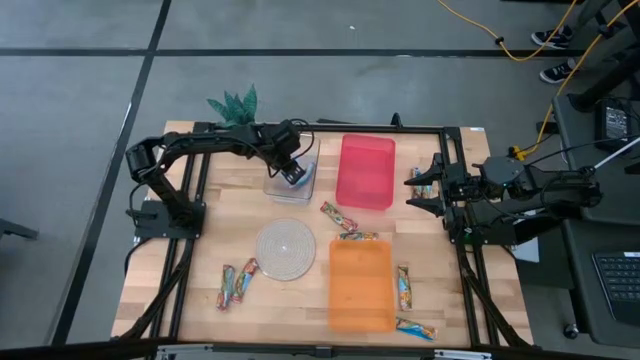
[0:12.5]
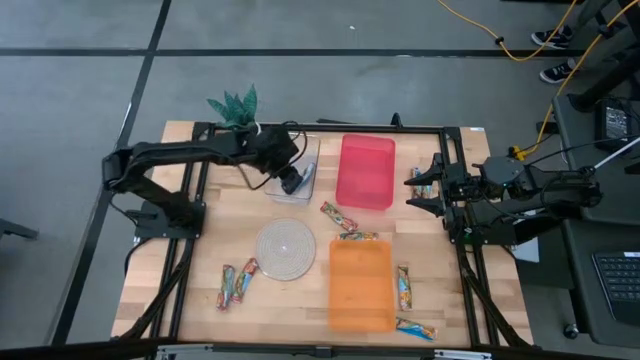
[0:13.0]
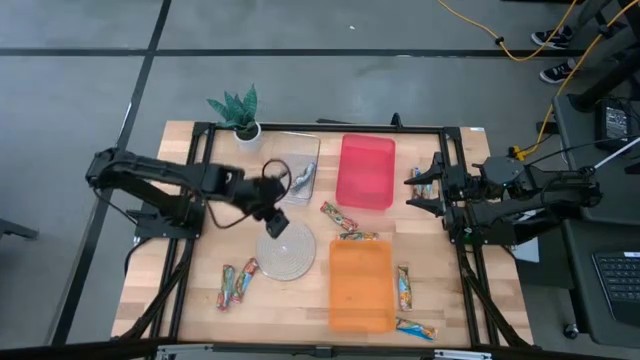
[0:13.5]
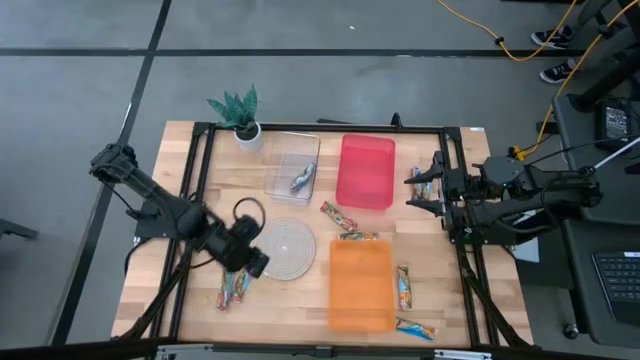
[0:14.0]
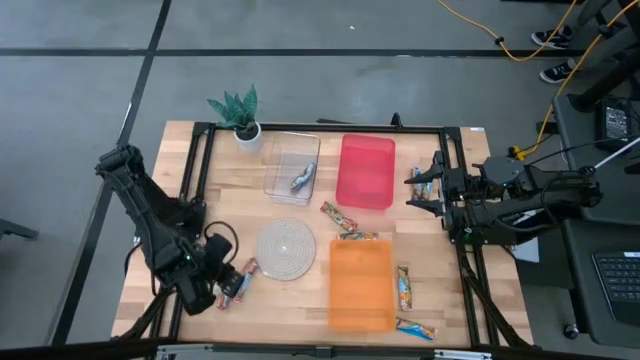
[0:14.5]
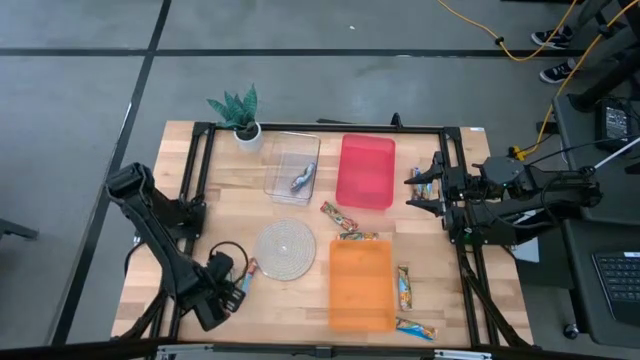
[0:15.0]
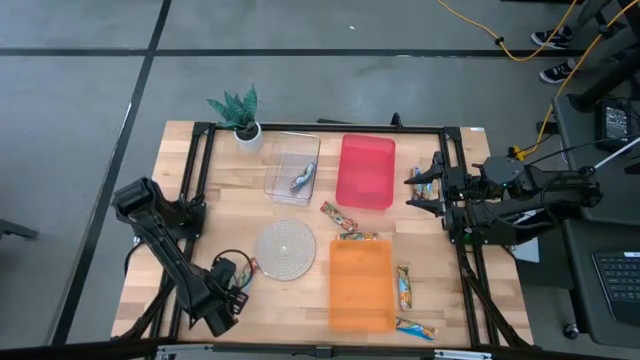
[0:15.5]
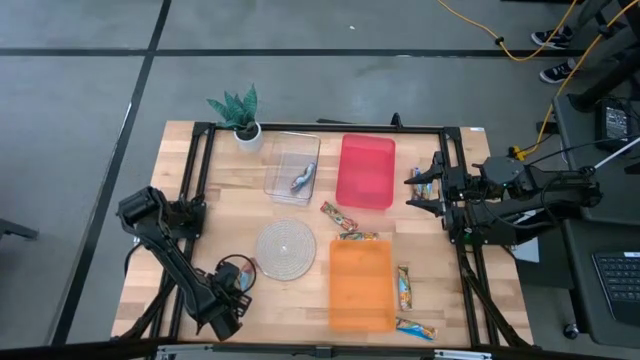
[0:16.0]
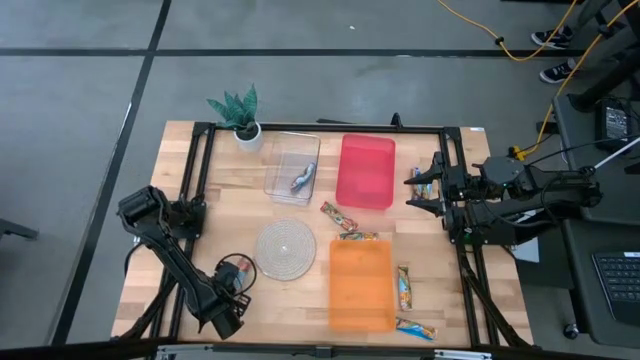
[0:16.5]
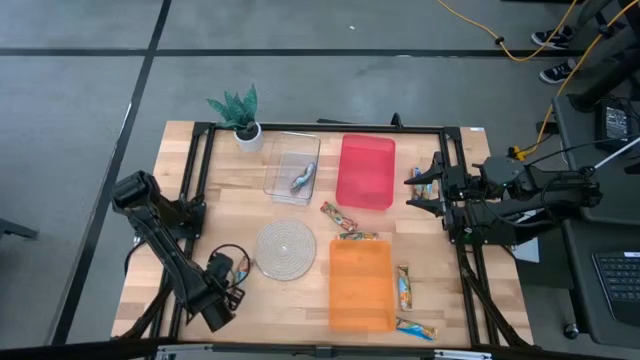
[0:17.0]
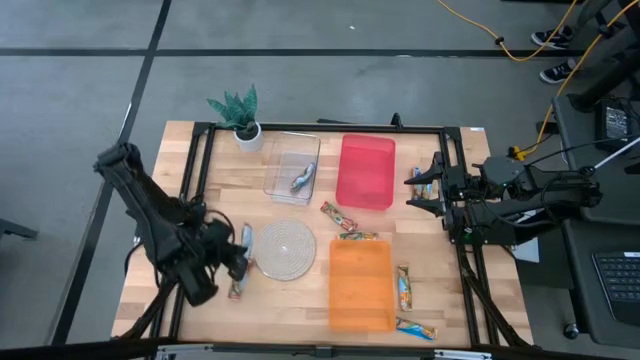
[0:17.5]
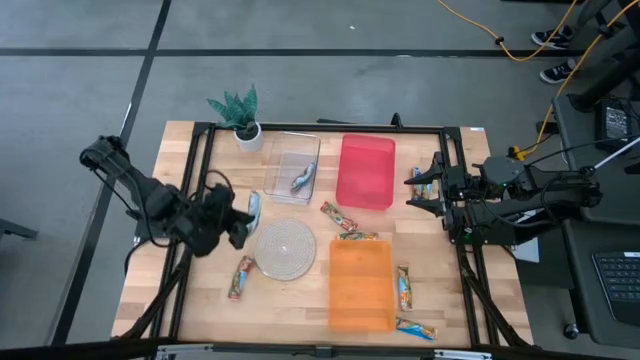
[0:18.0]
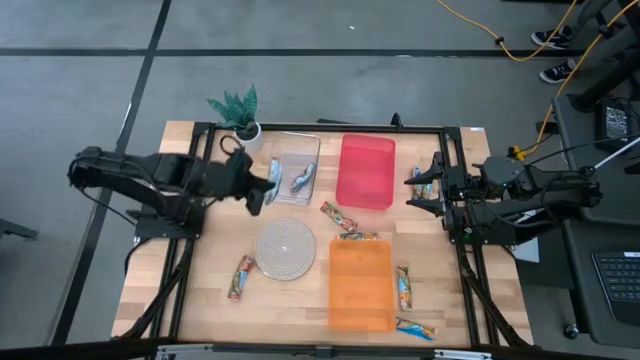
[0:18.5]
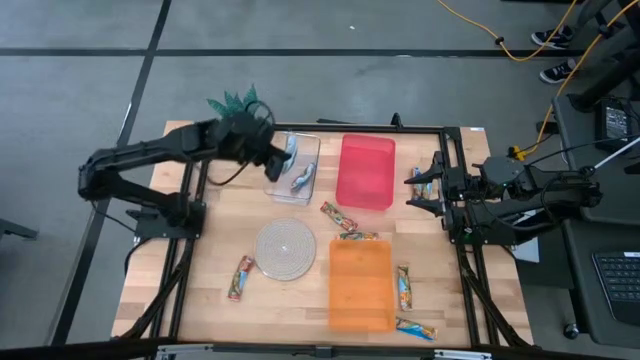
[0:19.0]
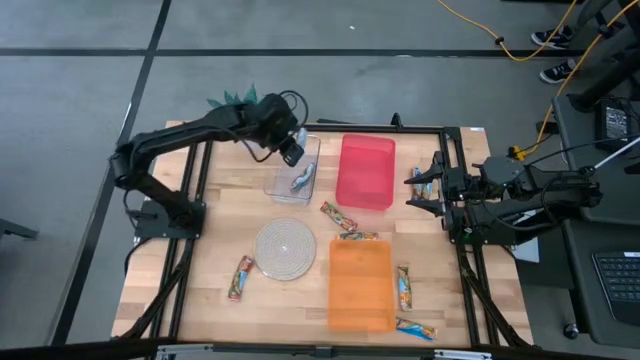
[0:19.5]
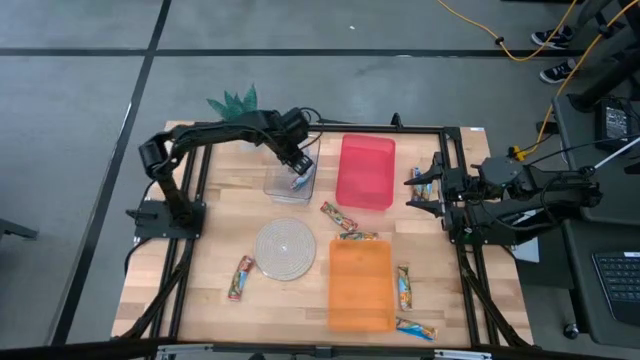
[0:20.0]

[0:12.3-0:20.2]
Task: Pick and place Granola Bars by type
Put the red granola bar into the transparent bin

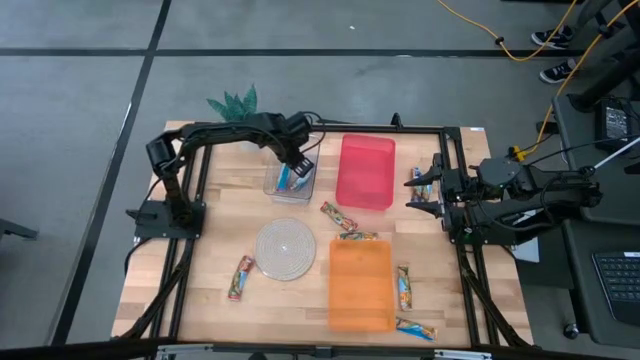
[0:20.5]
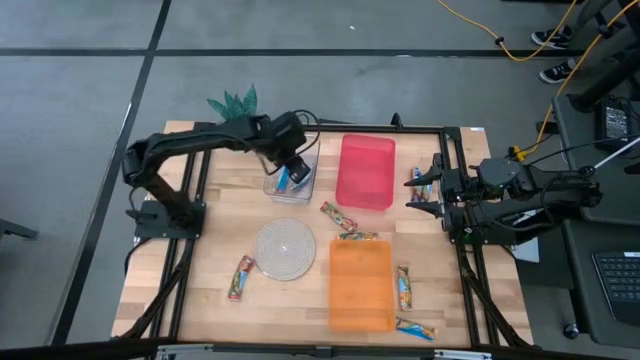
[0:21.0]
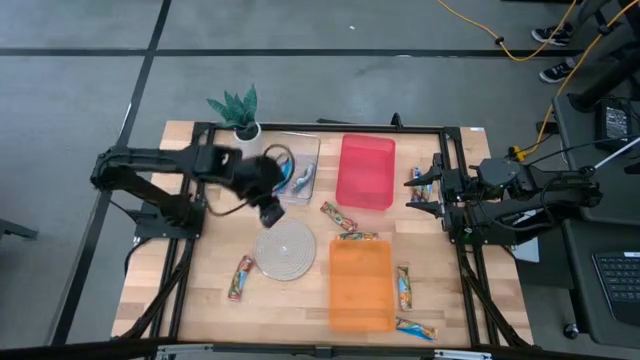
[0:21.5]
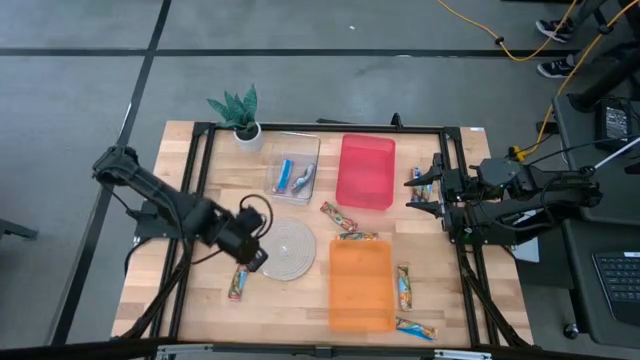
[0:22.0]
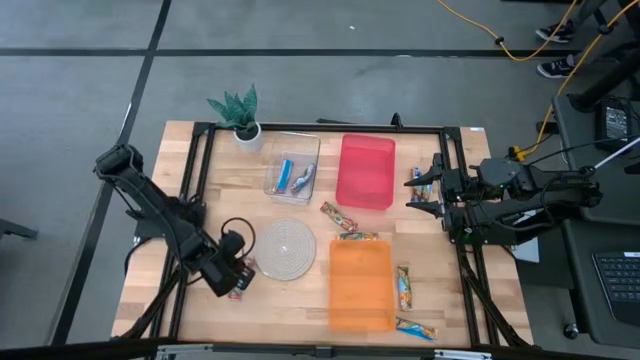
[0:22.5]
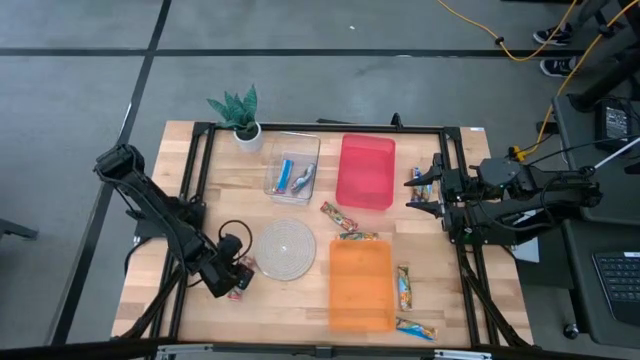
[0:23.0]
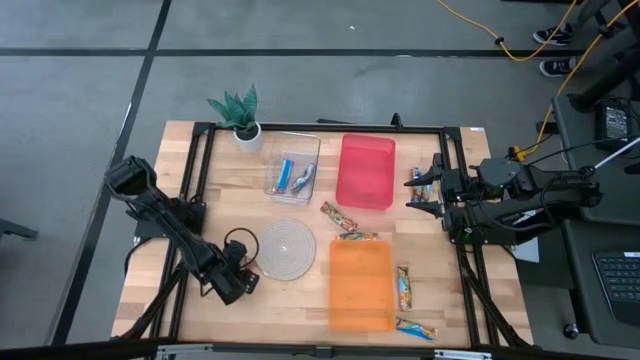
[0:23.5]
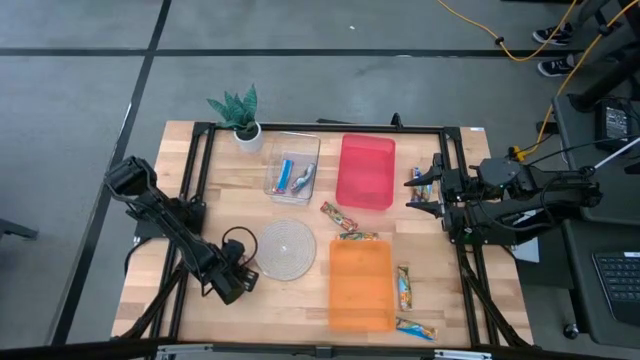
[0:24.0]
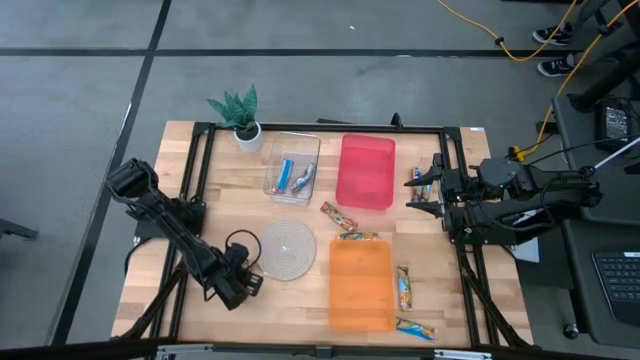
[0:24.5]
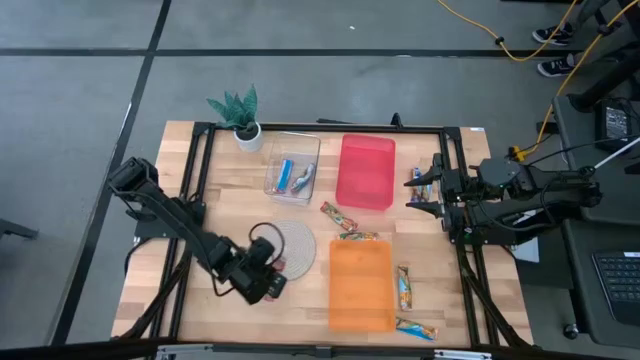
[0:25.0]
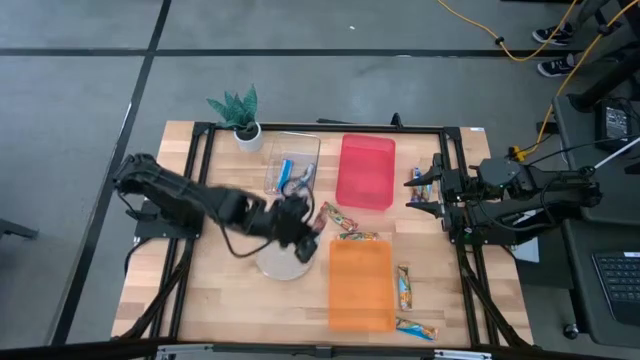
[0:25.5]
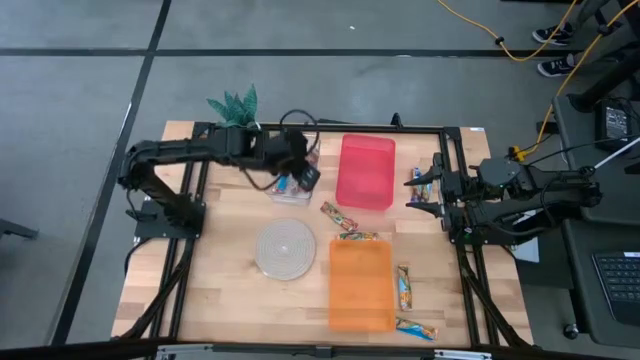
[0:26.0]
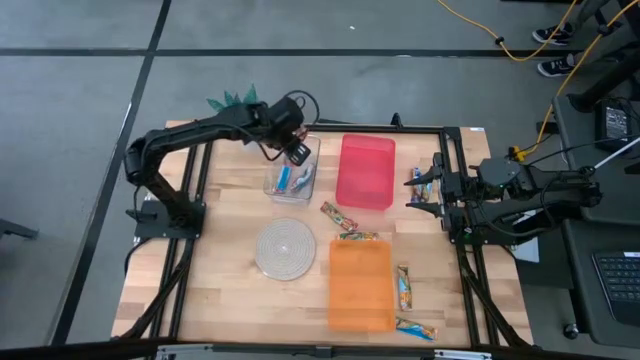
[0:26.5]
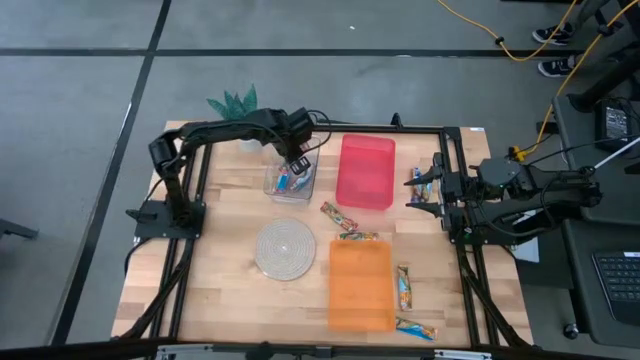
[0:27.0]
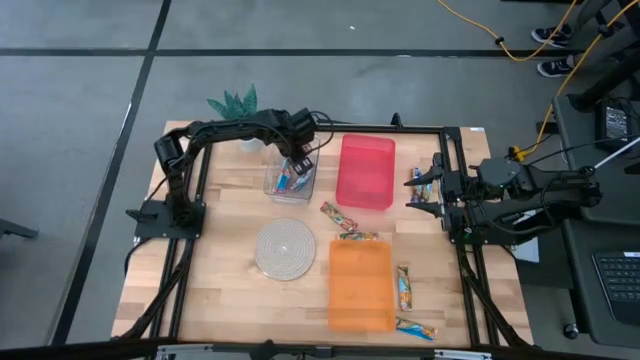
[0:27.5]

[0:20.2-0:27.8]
Put the red granola bar into the transparent bin

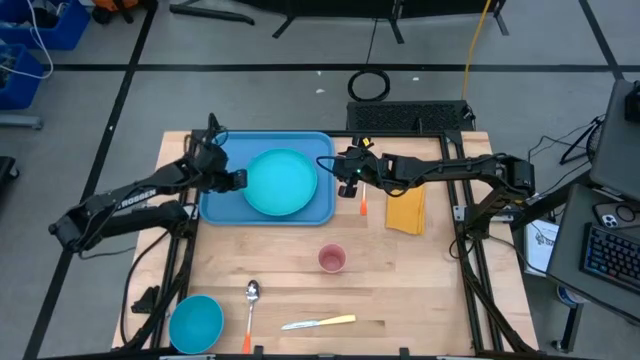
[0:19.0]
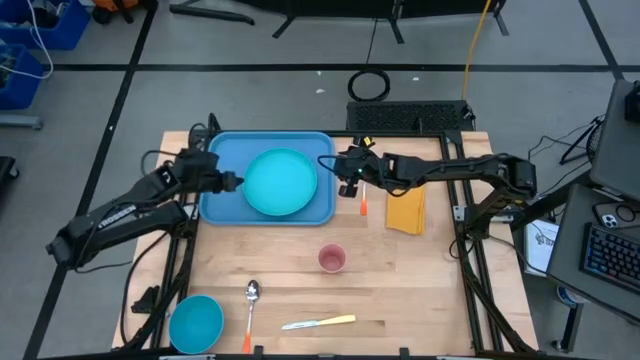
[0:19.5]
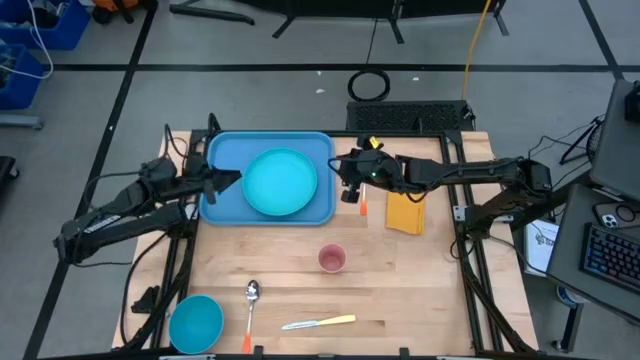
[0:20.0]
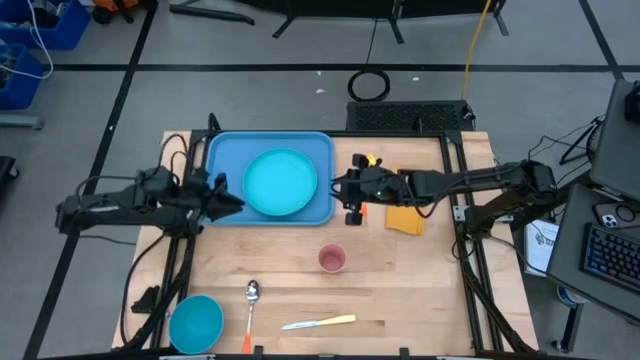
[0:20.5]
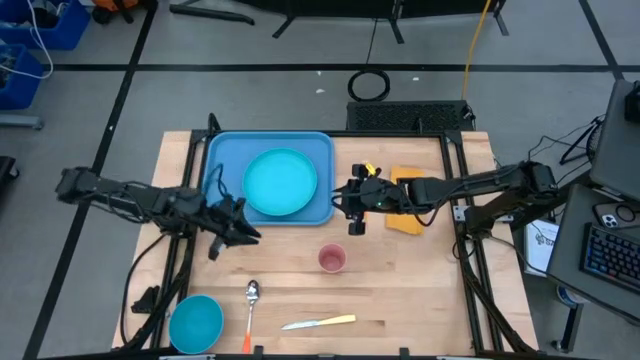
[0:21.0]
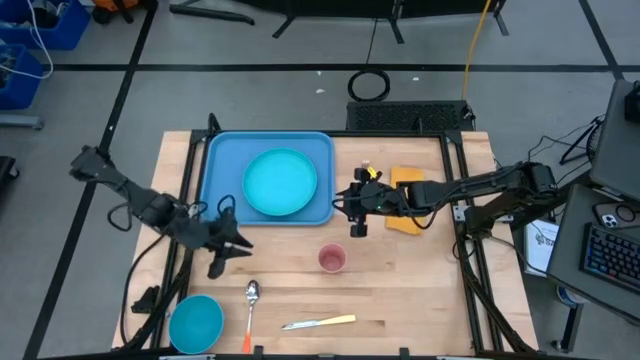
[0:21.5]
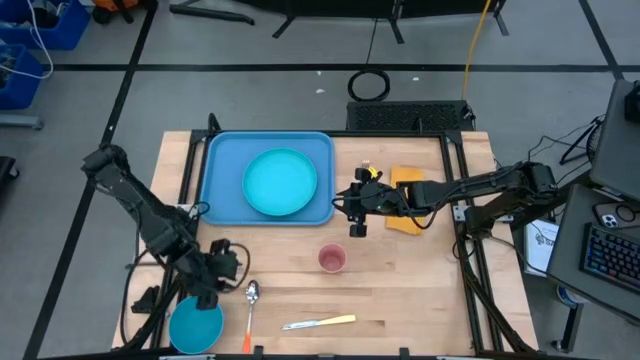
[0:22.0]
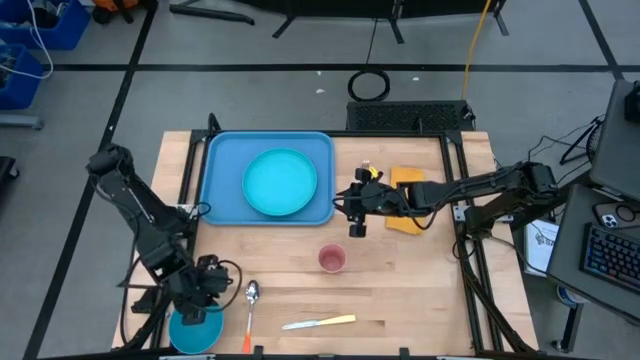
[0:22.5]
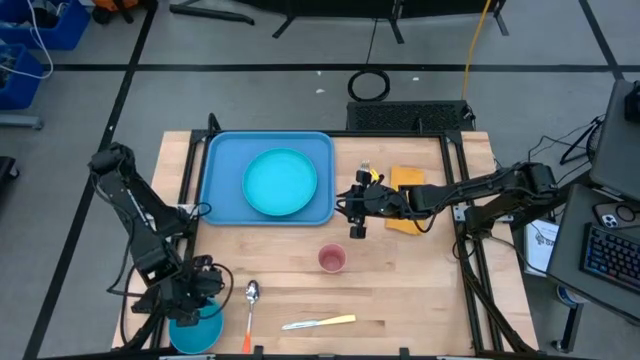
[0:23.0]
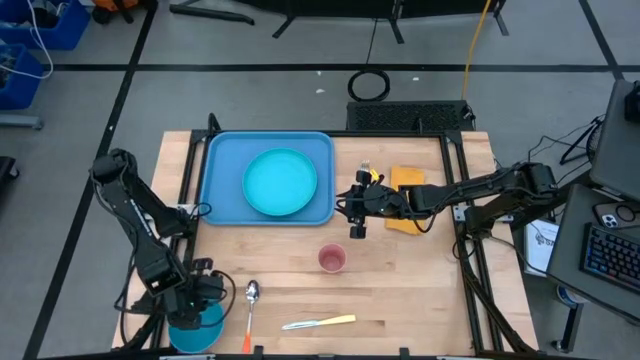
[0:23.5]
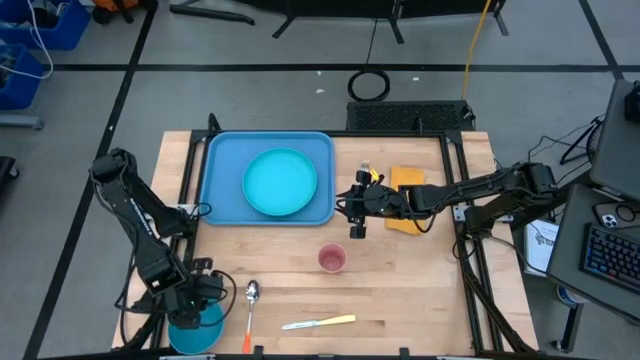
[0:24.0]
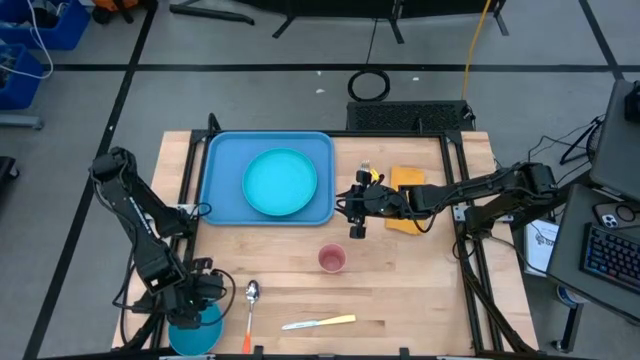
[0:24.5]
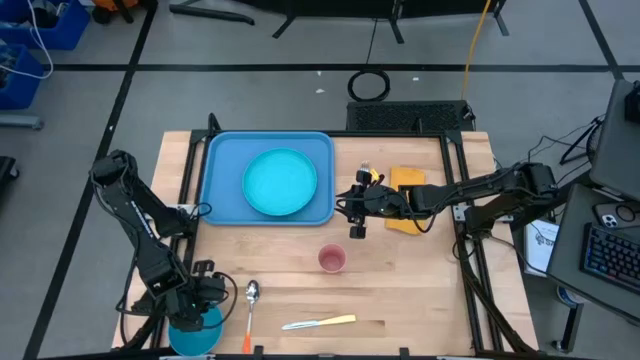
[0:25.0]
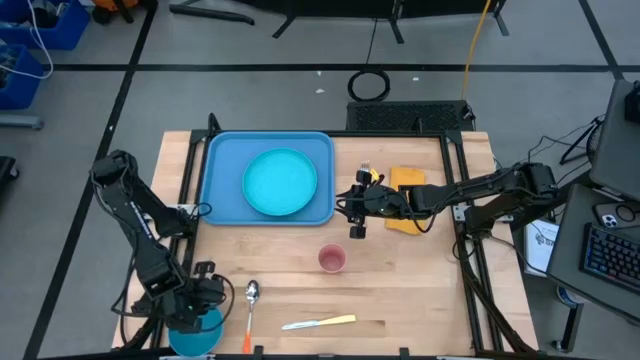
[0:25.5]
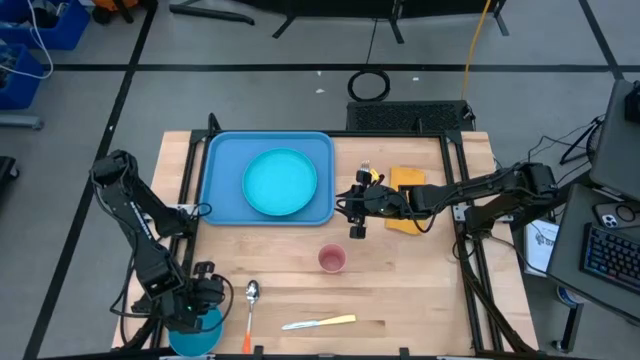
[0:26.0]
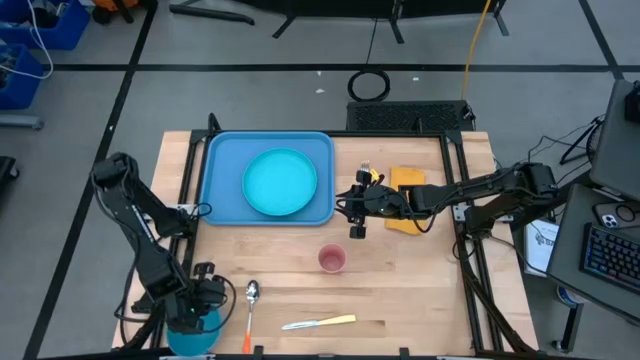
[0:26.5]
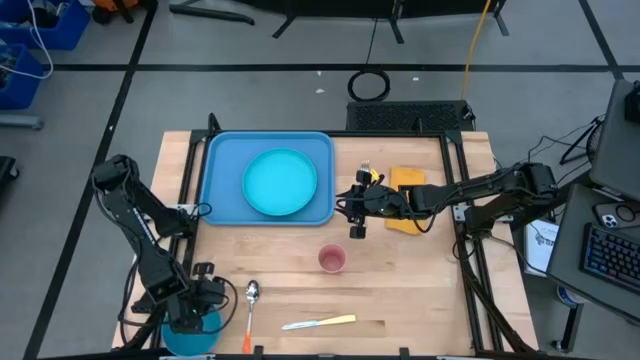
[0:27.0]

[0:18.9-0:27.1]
Task: Set up tray
Put the blue bowl on the green plate on the blue serving tray
